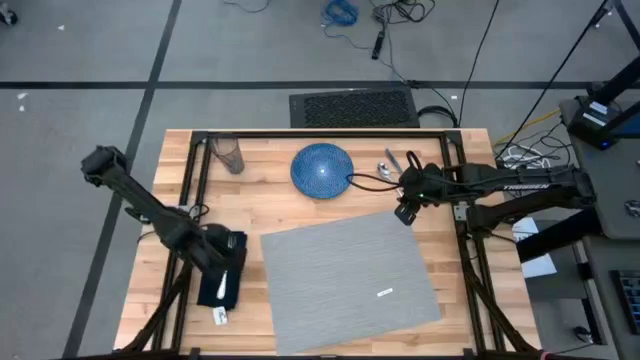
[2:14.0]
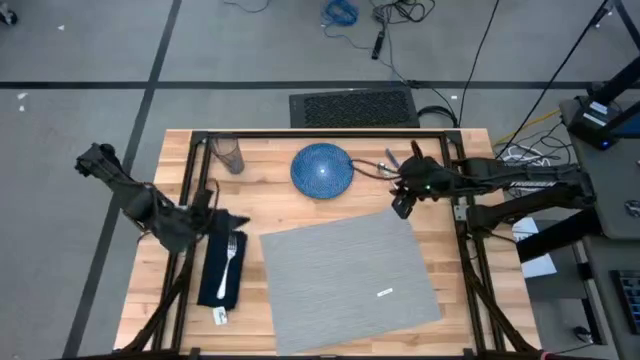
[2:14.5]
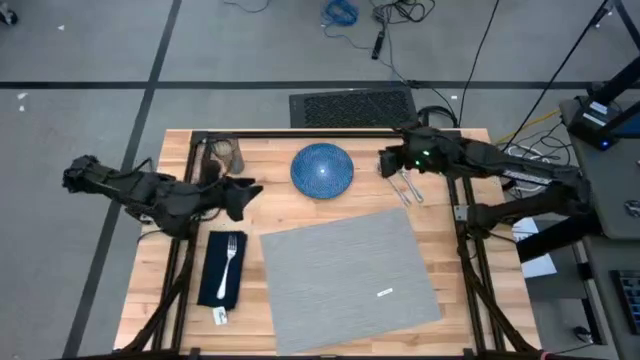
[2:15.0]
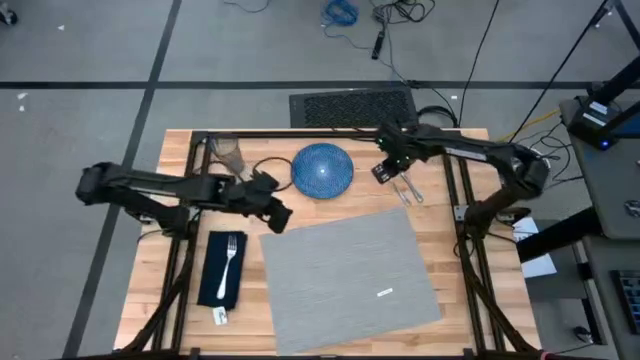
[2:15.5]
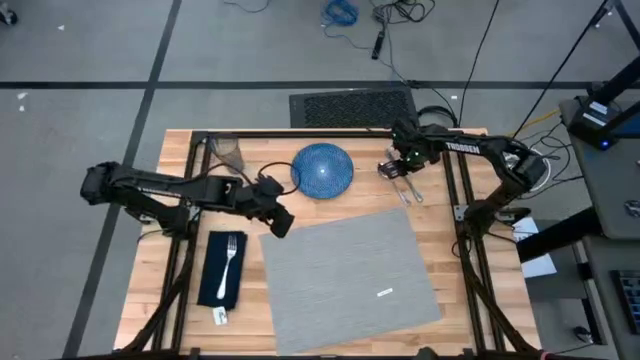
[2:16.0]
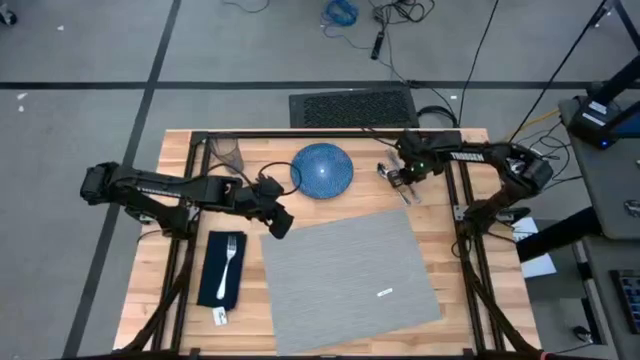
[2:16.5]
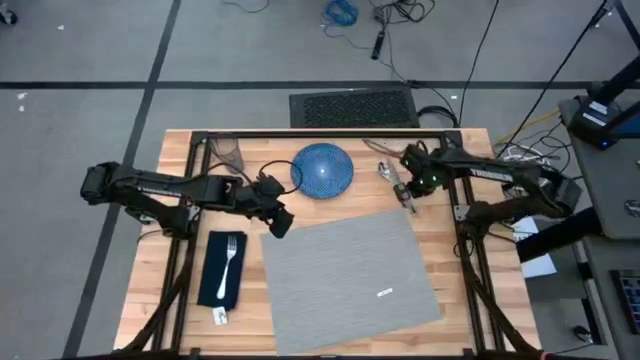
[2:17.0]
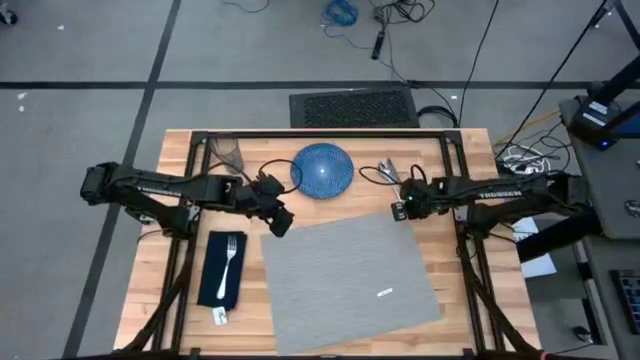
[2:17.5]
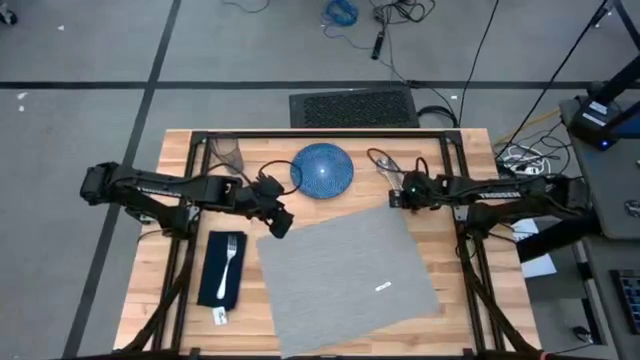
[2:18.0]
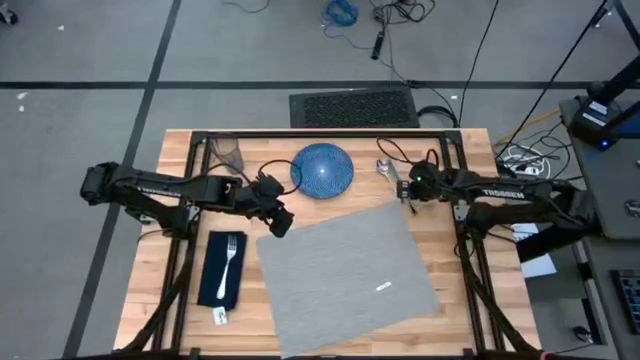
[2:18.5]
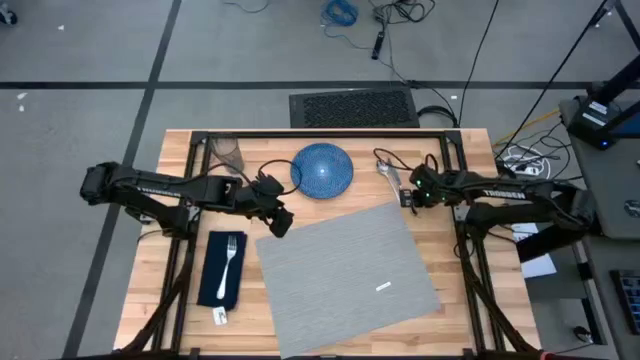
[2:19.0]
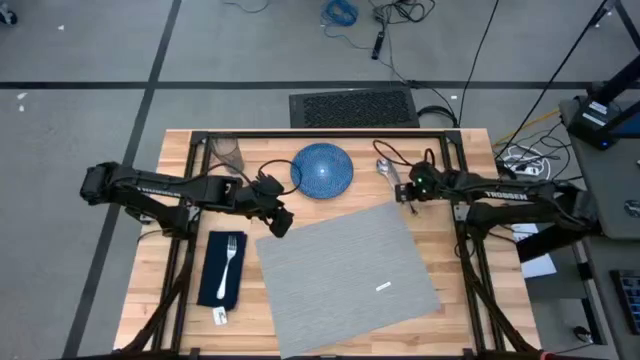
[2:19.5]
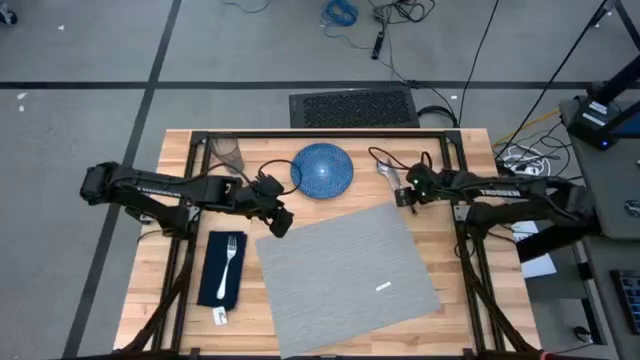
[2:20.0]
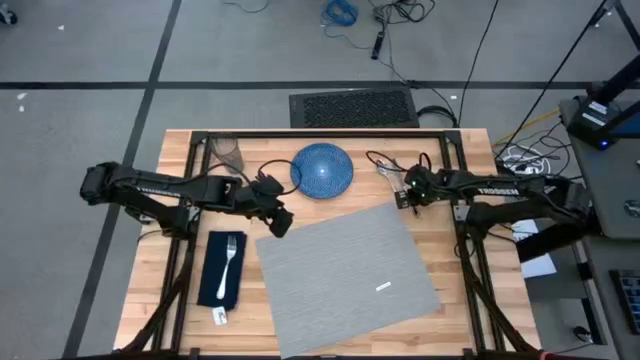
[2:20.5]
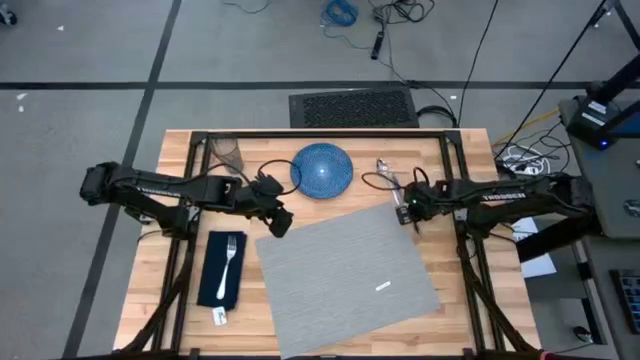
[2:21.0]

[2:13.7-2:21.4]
Task: Set table place
Put the silver knife on the gray placemat

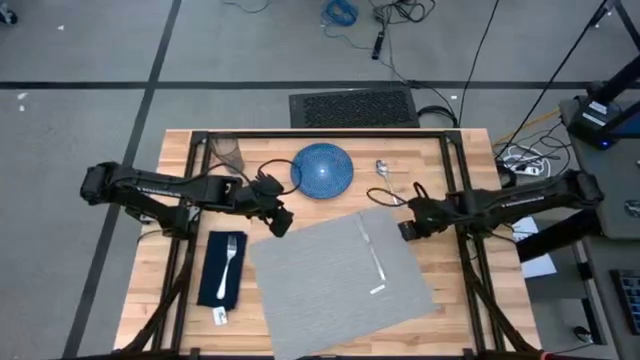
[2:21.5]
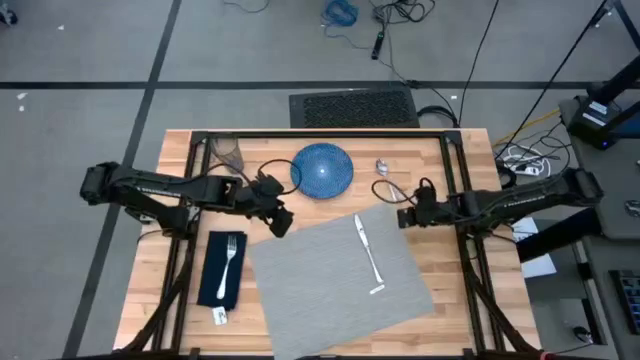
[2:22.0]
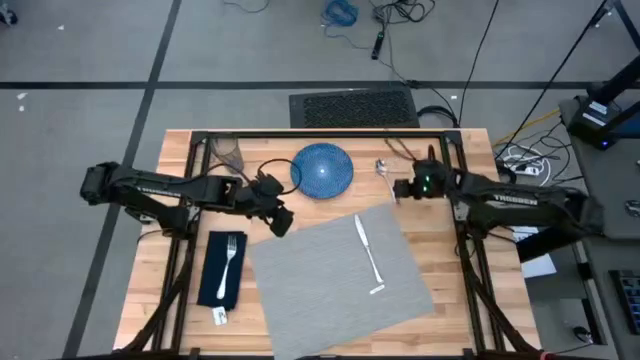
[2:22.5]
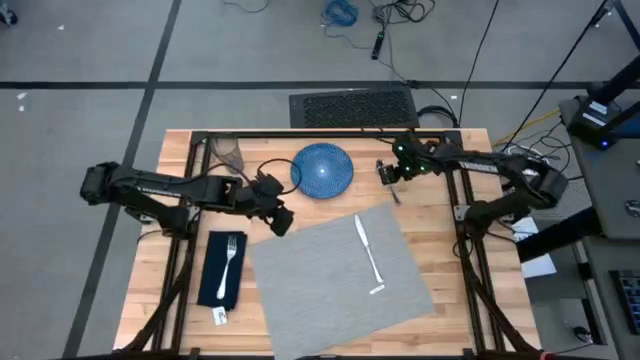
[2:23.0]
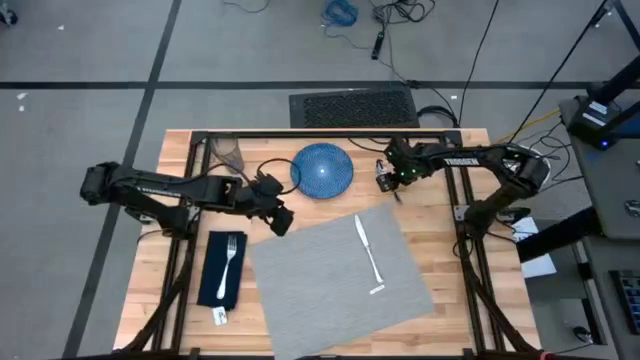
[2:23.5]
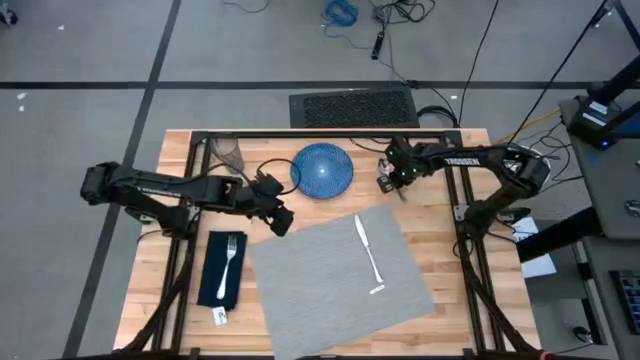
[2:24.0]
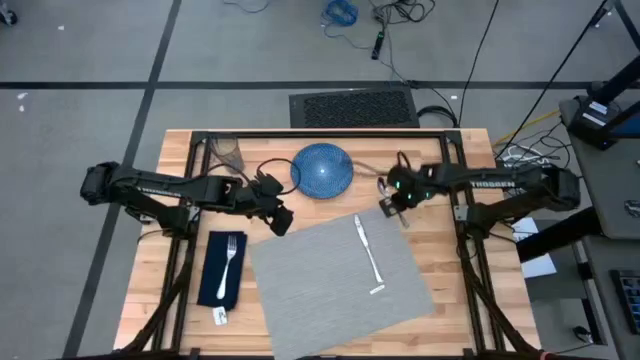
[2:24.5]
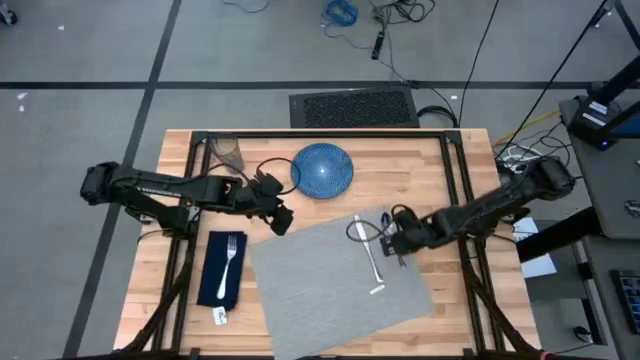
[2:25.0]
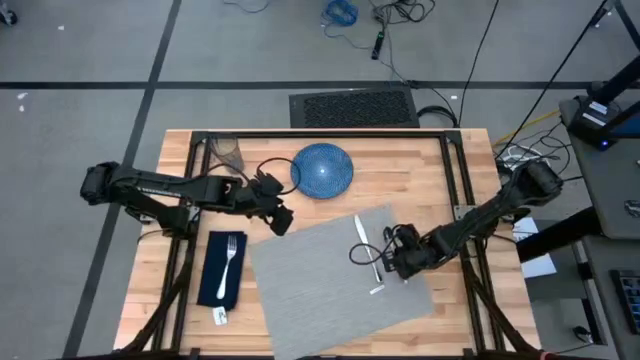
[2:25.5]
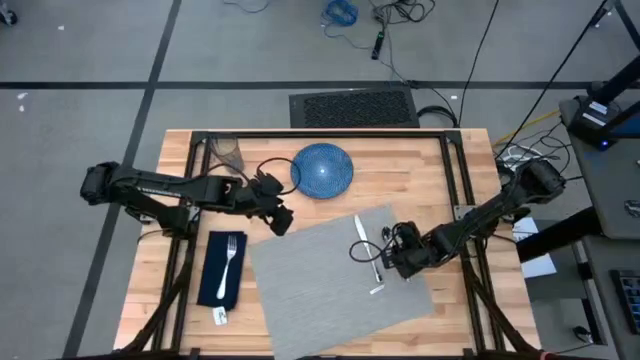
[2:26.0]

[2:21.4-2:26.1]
Put the silver spoon on the gray placemat

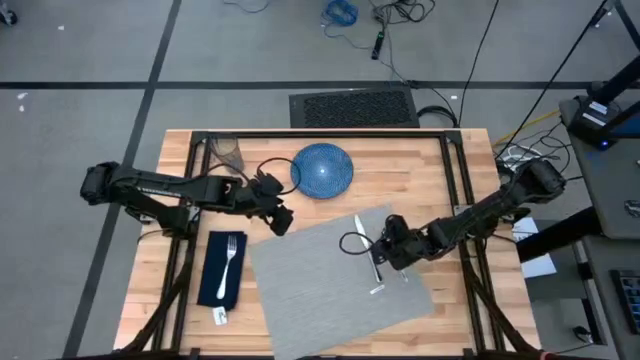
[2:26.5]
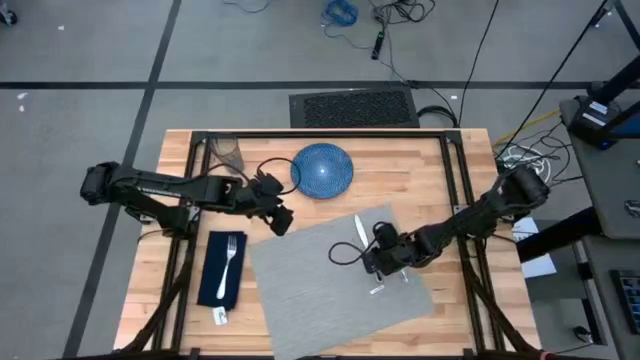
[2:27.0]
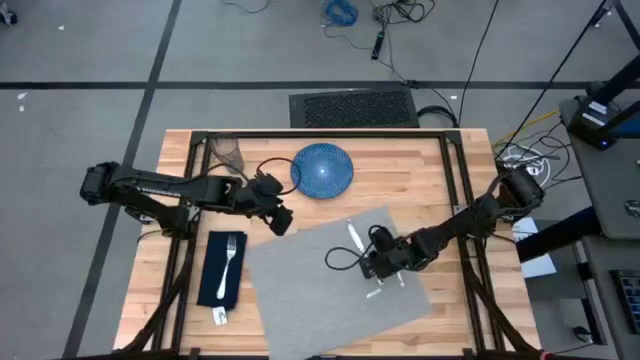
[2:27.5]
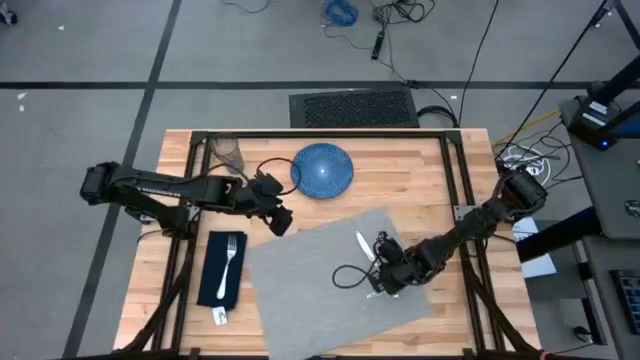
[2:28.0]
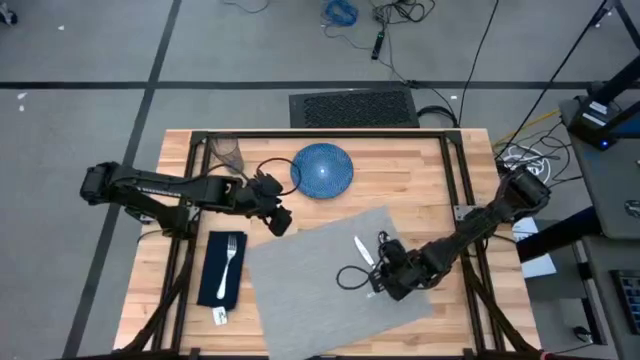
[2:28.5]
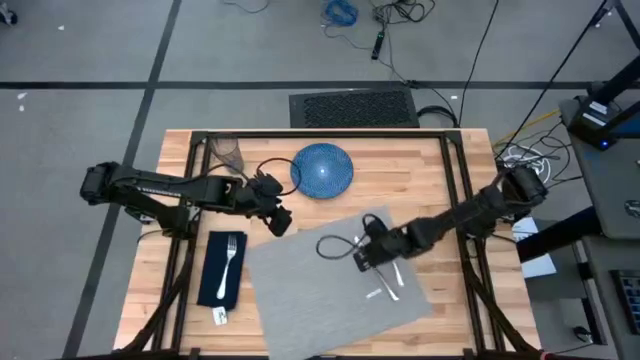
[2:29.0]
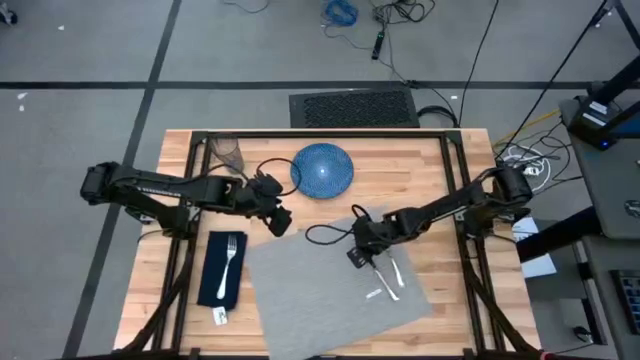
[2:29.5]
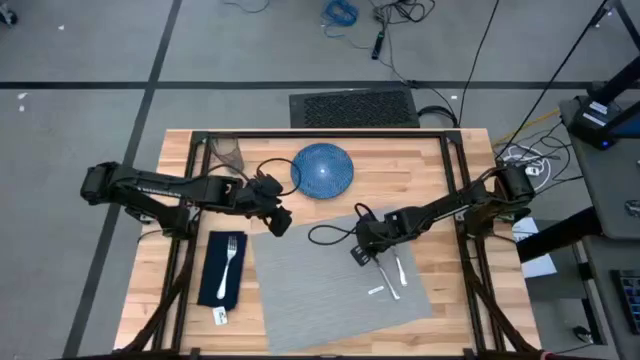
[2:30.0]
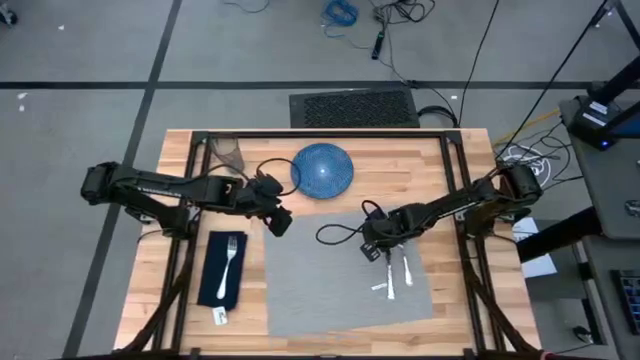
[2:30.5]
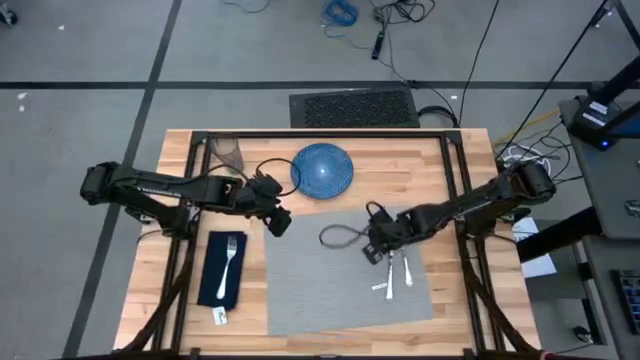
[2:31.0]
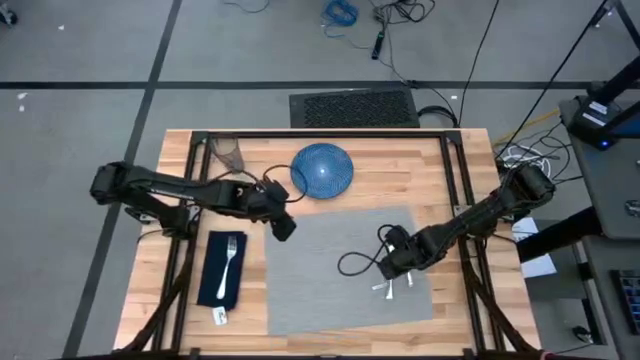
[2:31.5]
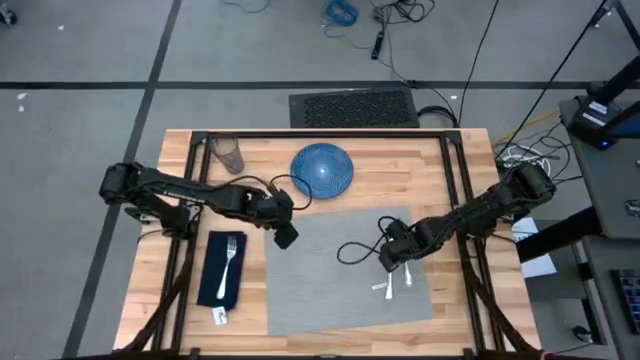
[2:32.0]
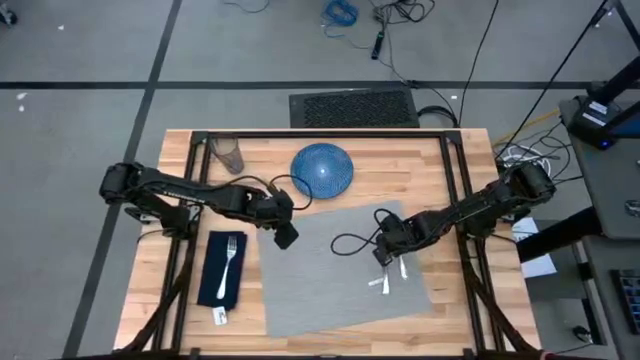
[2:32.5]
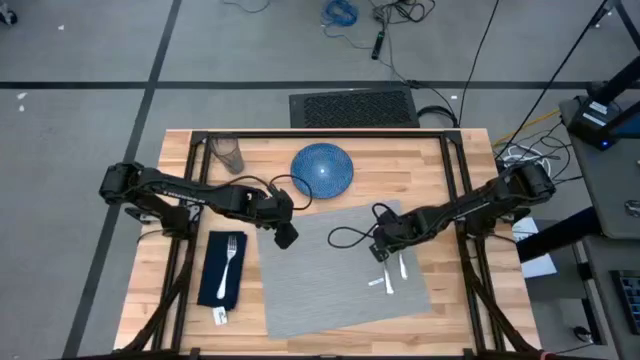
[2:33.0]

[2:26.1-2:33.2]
Adjust the silver table knife on the gray placemat

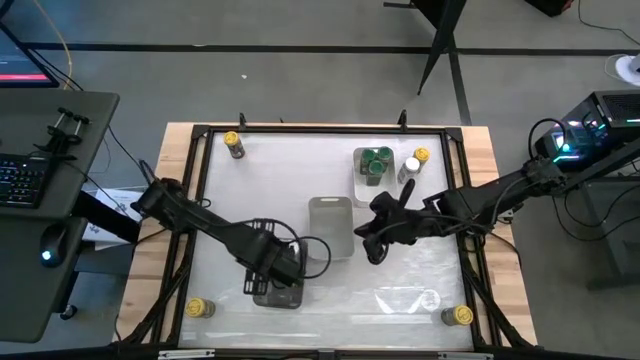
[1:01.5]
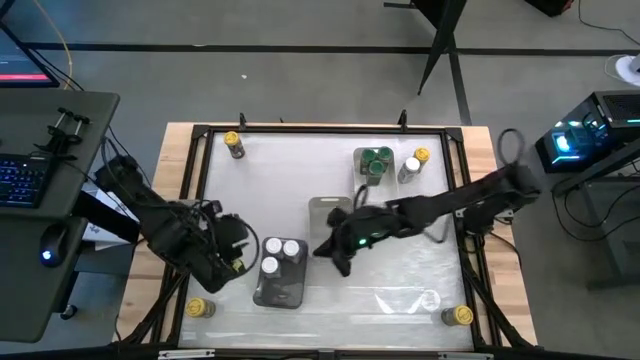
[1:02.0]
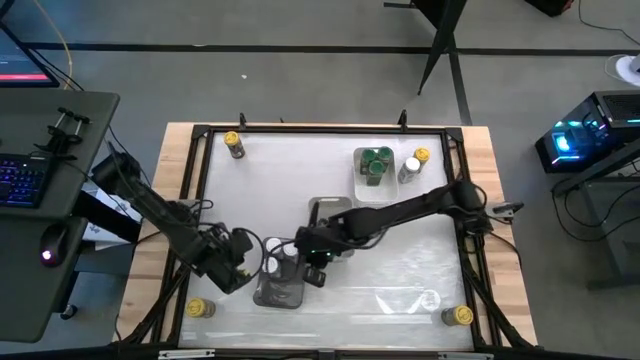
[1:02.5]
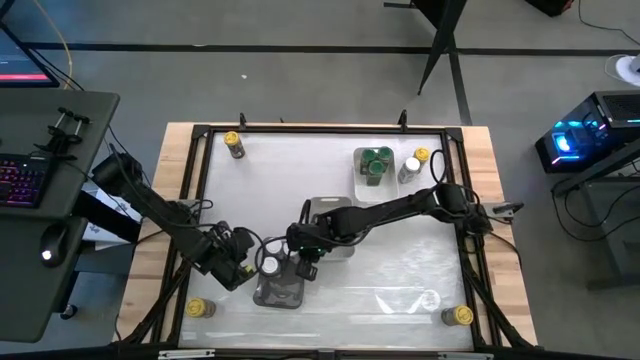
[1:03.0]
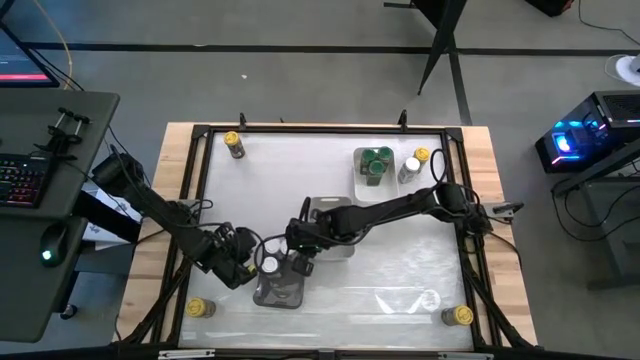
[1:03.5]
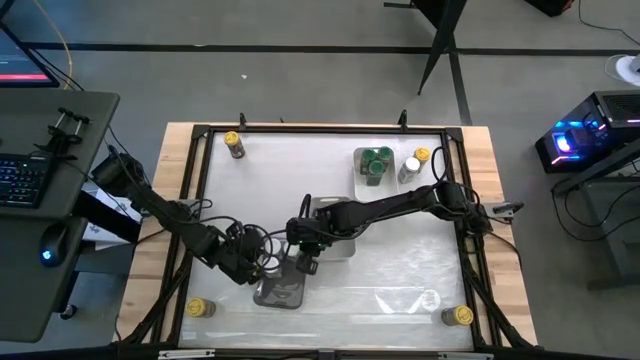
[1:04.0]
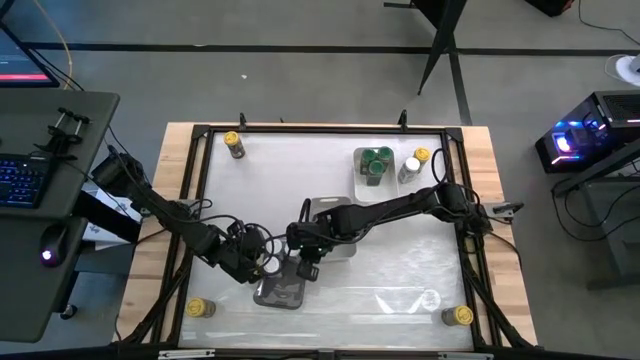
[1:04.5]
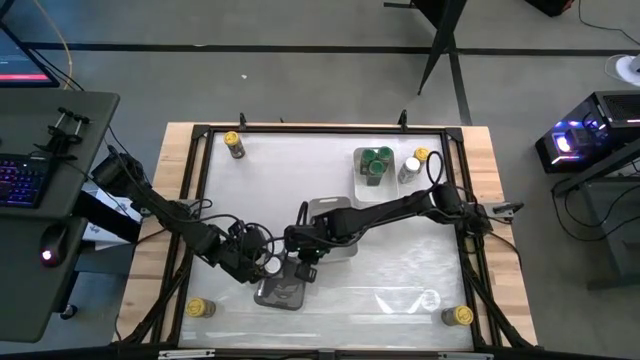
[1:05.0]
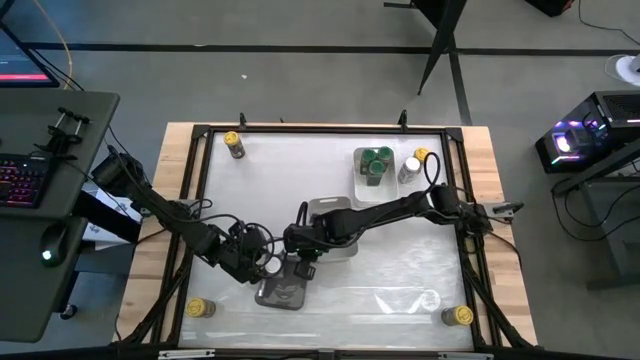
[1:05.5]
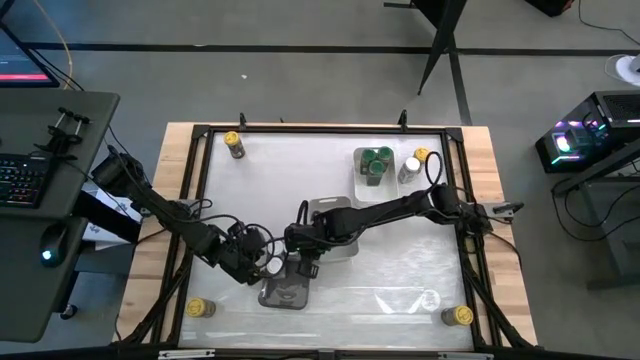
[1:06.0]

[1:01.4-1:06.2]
Task: Sort spices by type
Adjust the white seasoning bottle in the black bin
